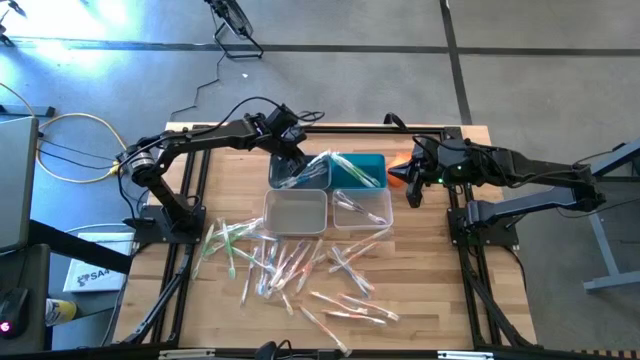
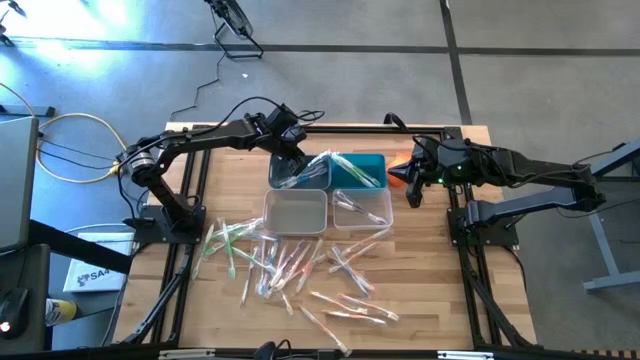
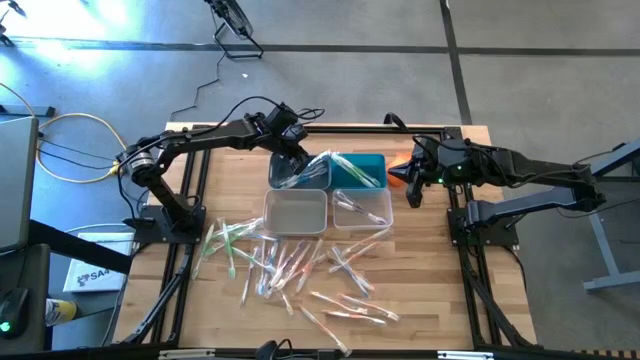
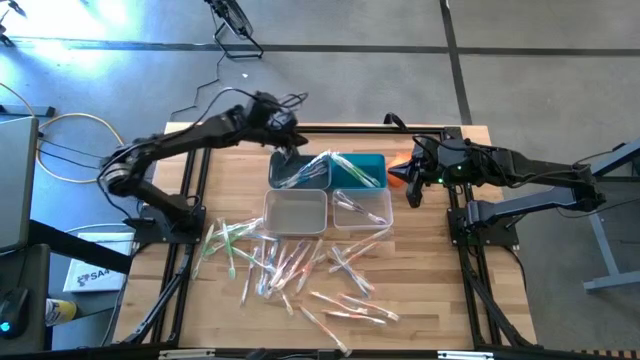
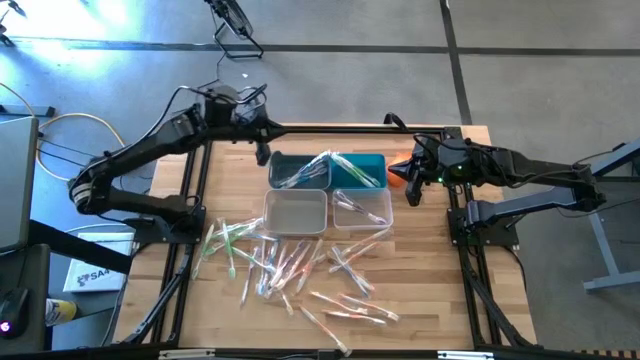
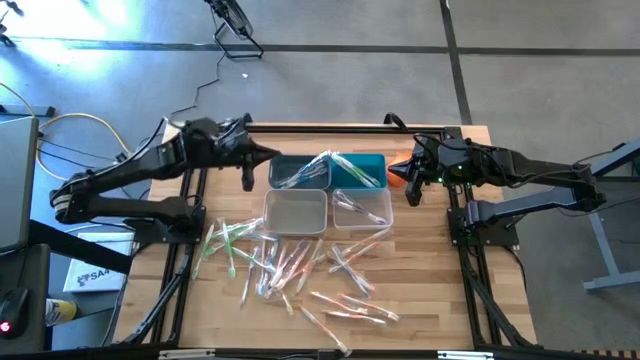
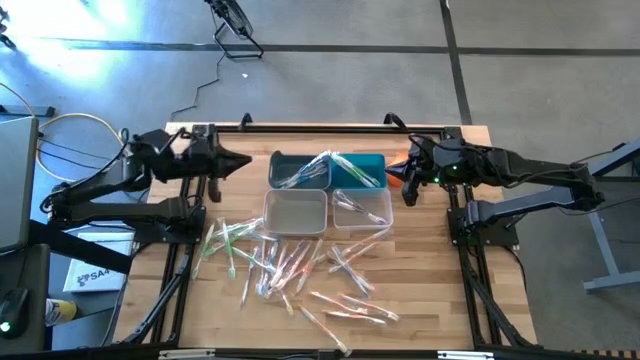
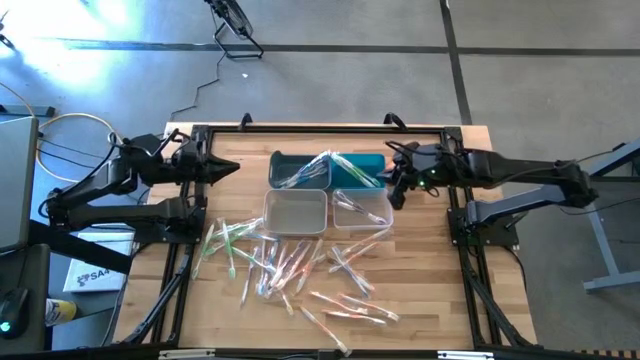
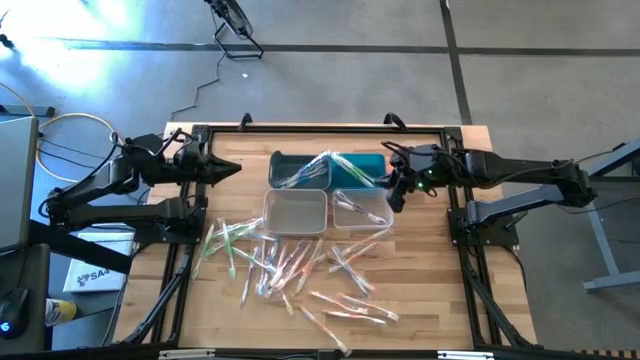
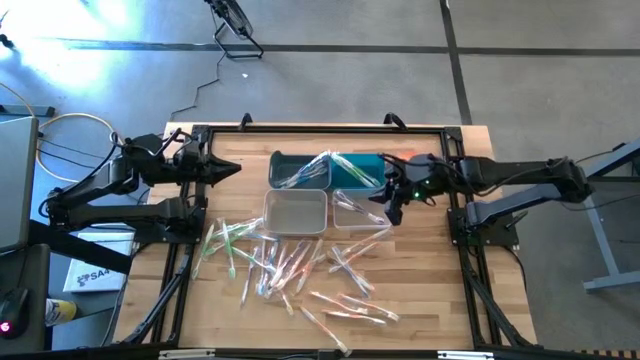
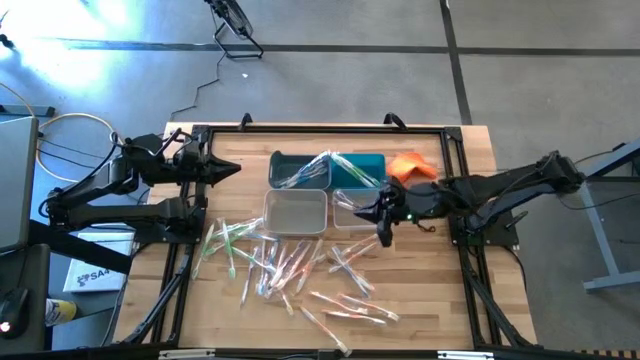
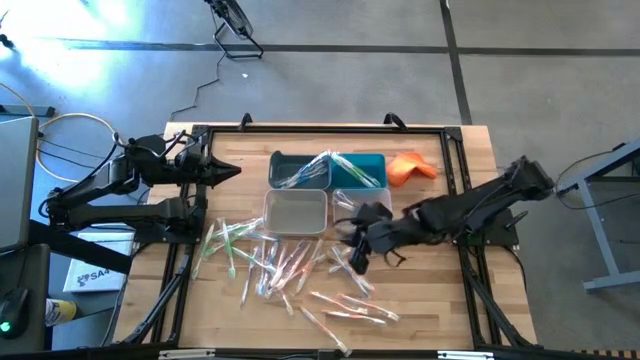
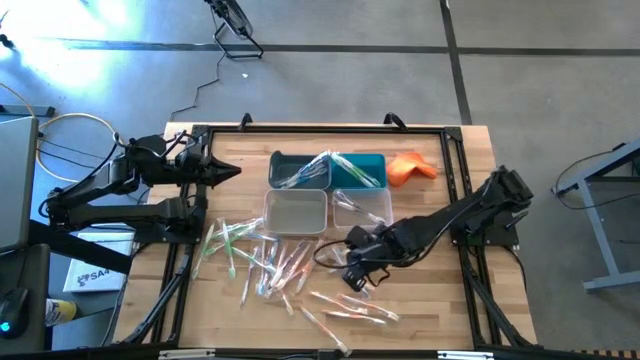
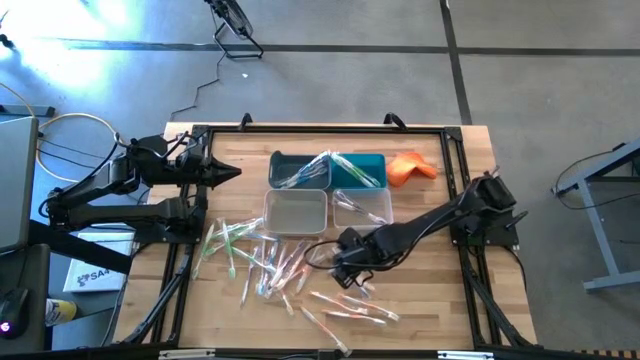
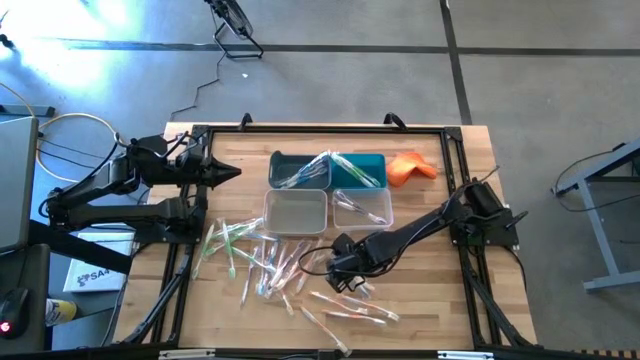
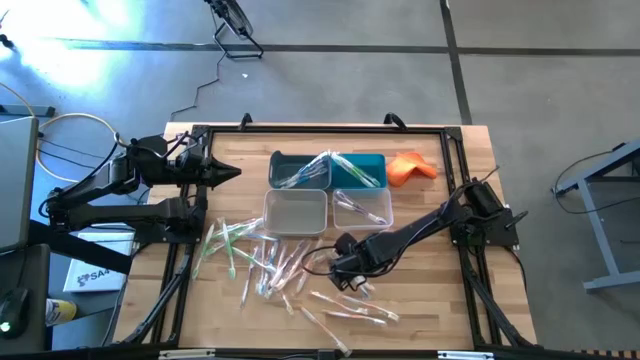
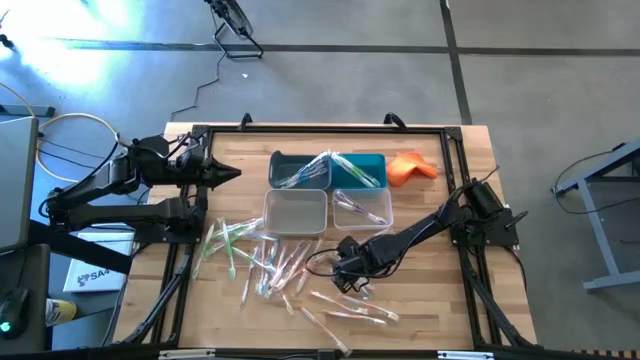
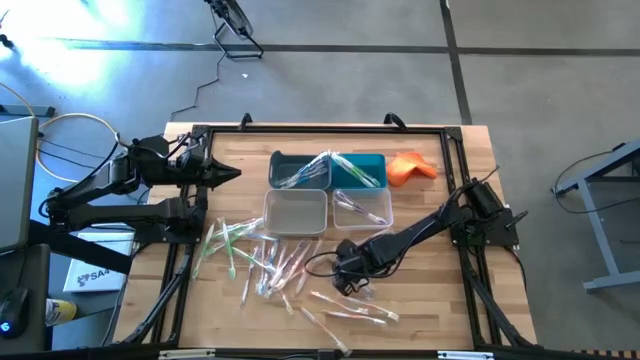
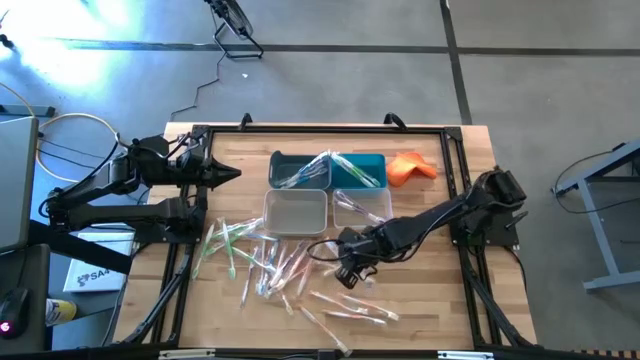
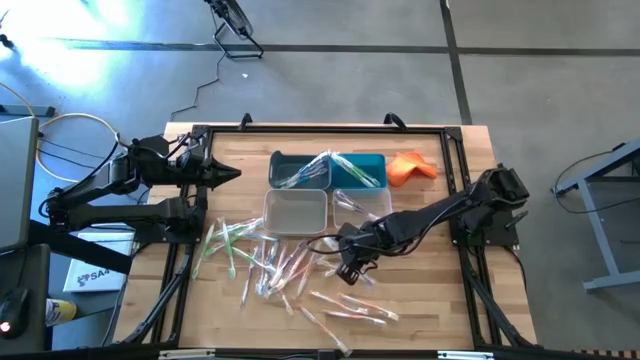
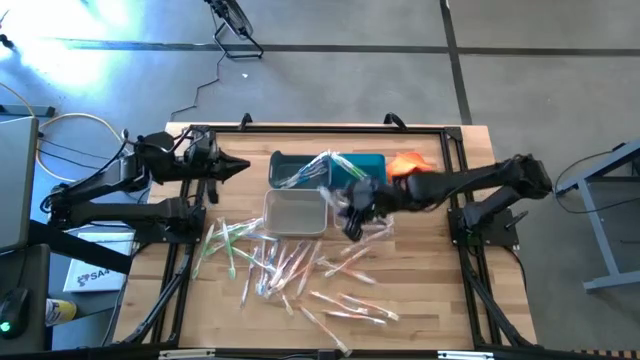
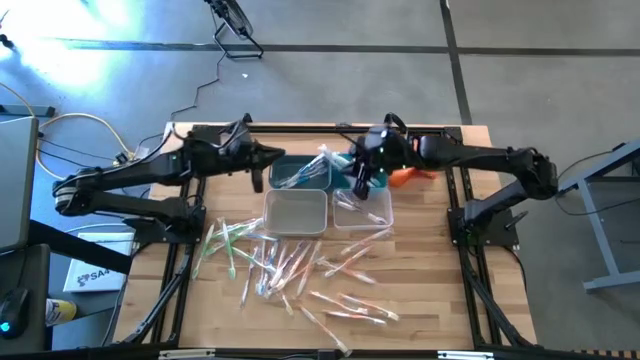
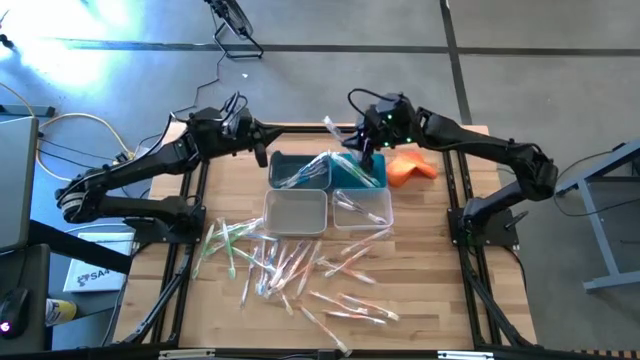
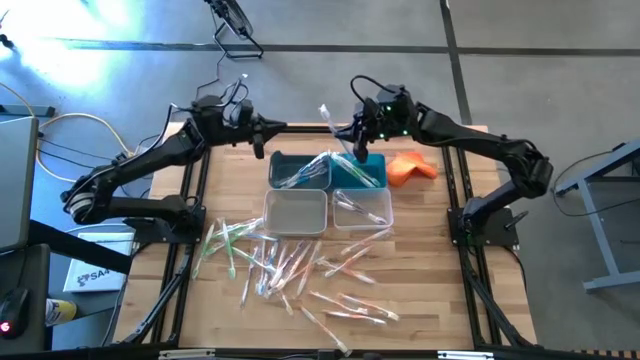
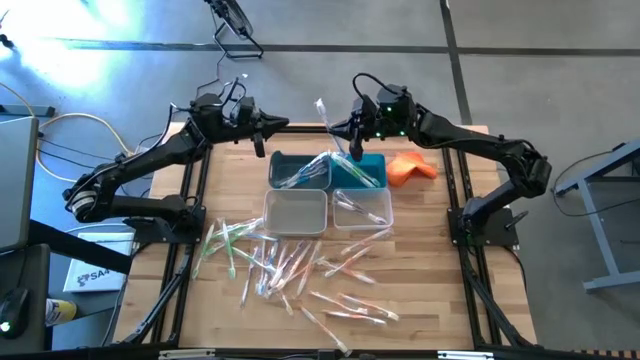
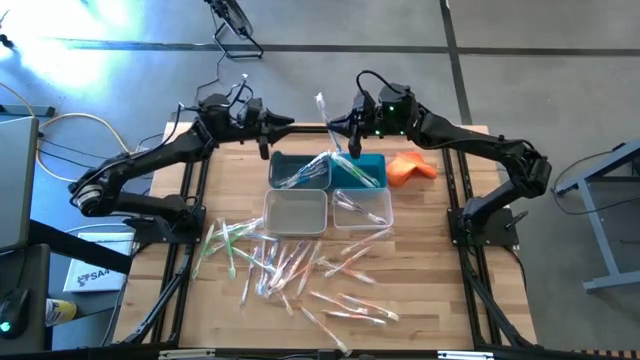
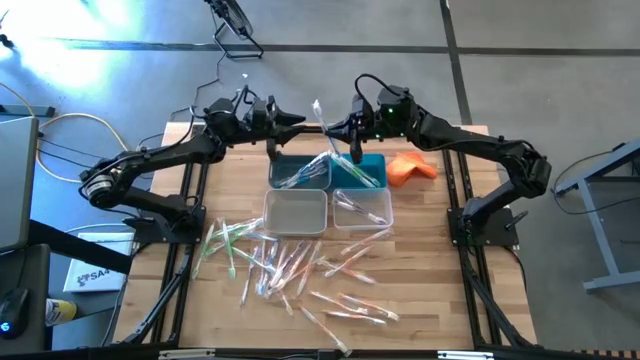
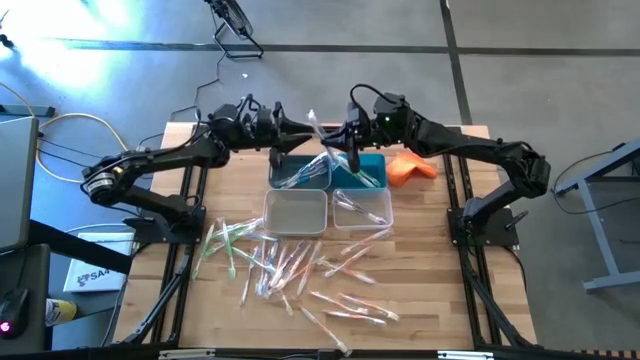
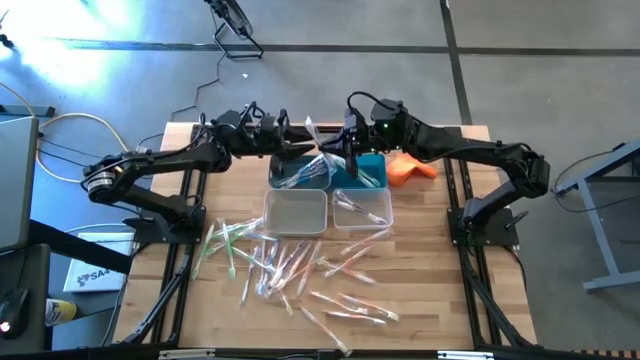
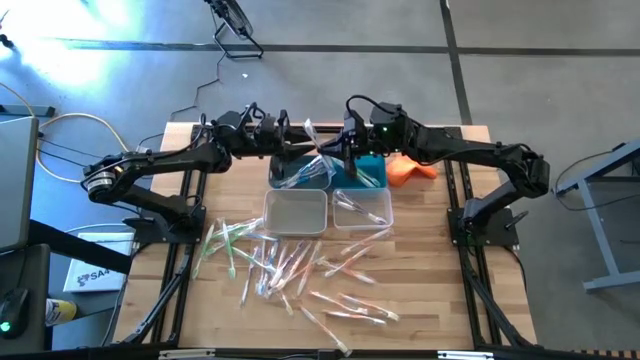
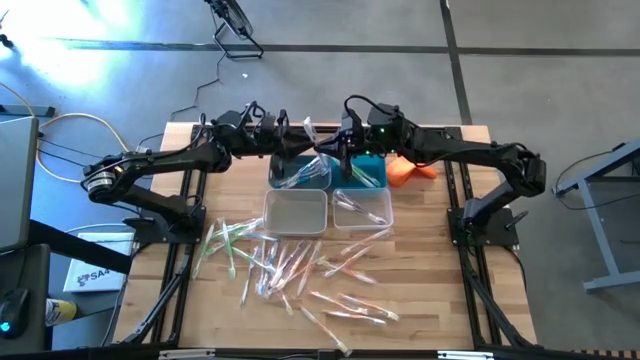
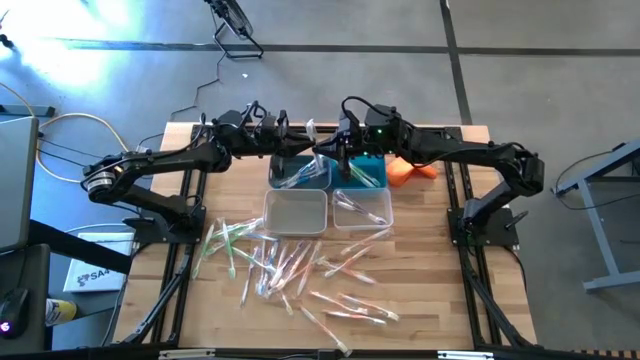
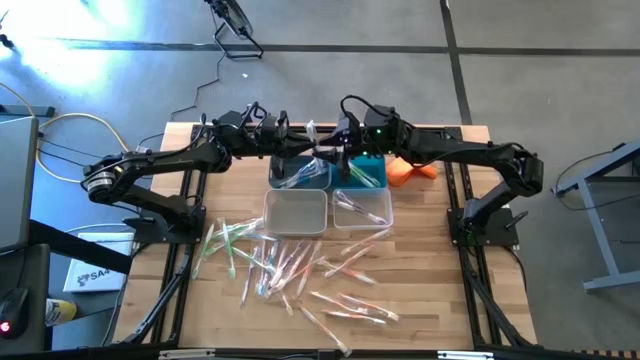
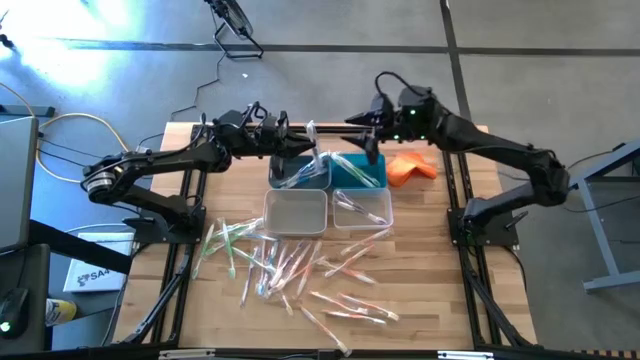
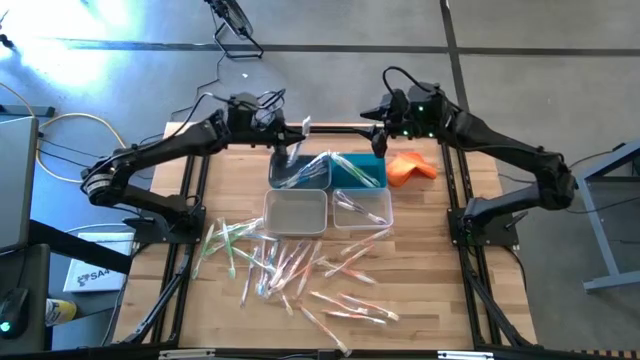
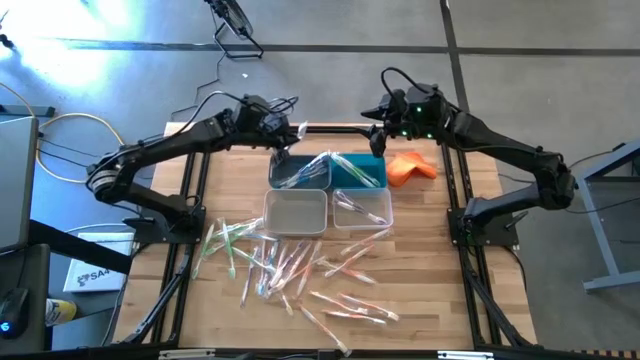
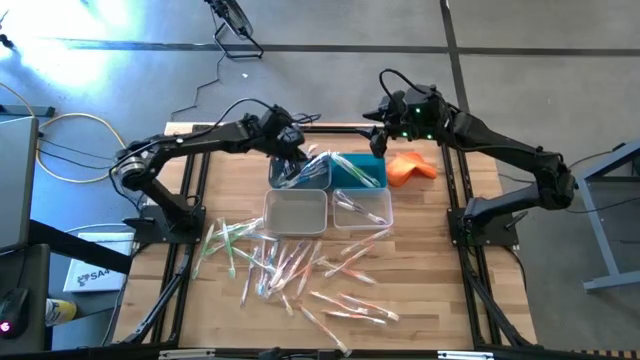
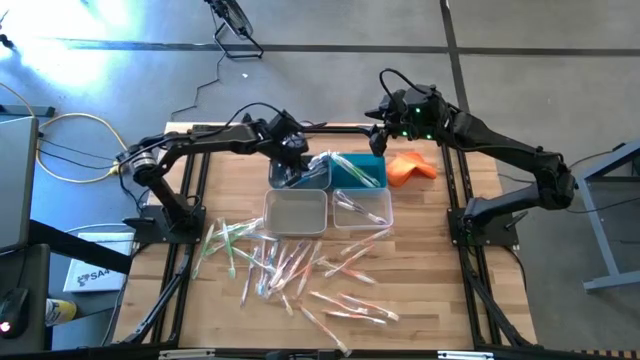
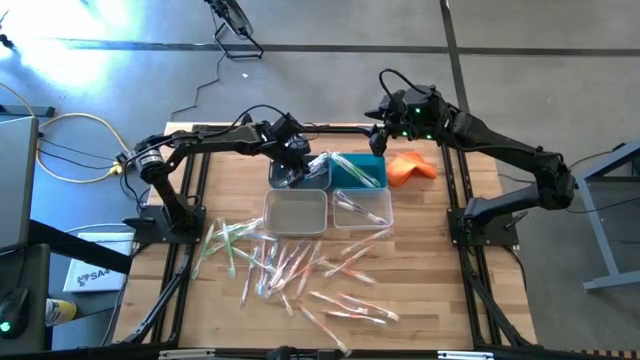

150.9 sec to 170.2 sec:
Task: Pick & Place Toothbrushes
Put the blue toothbrush into the dark blue bin

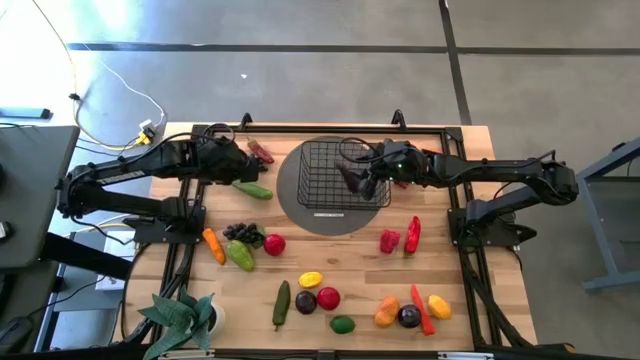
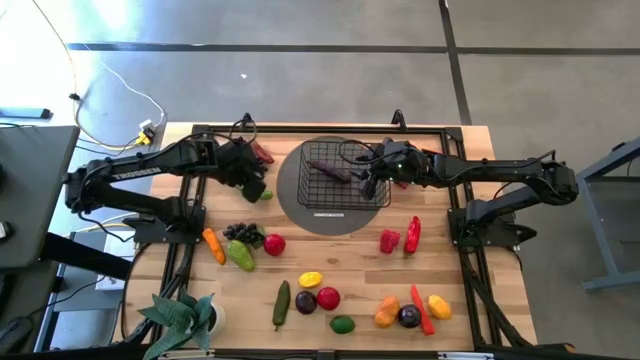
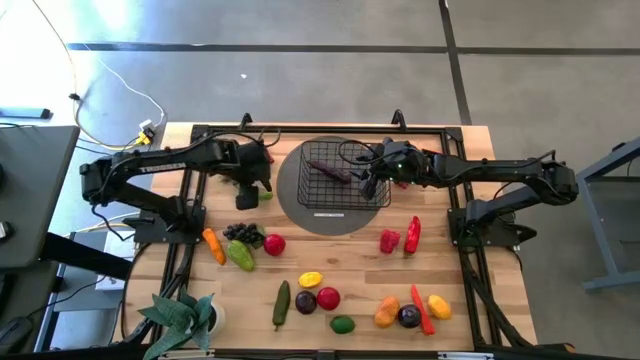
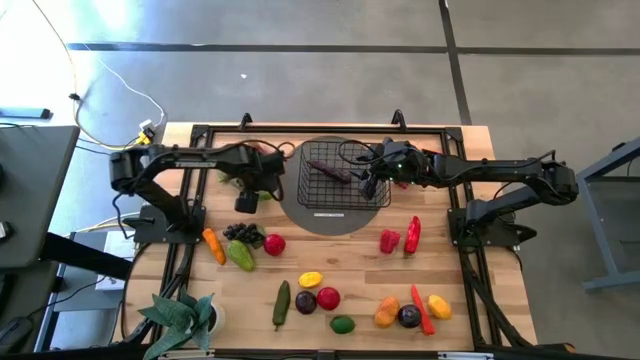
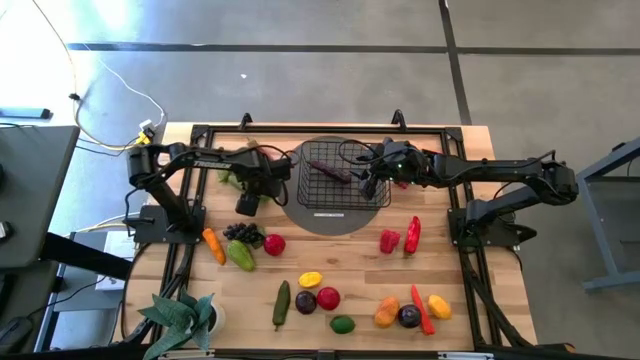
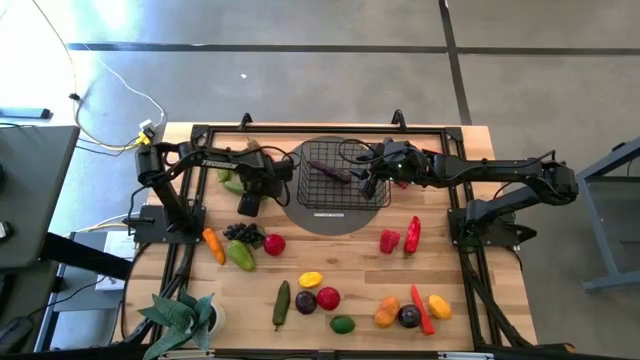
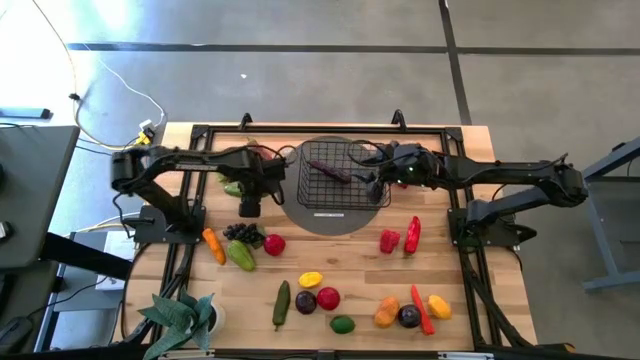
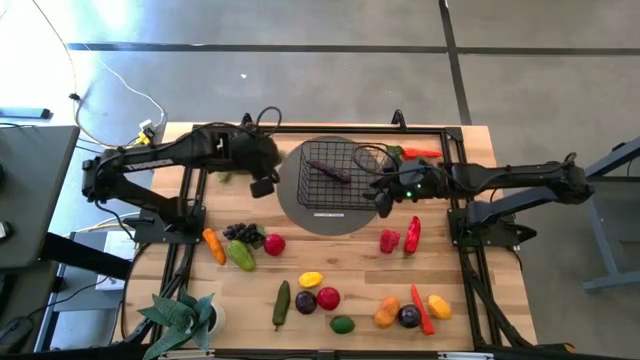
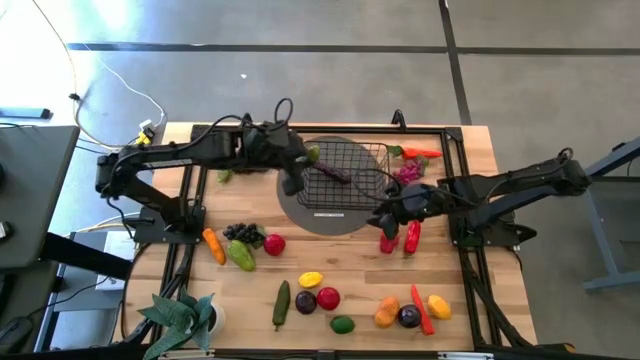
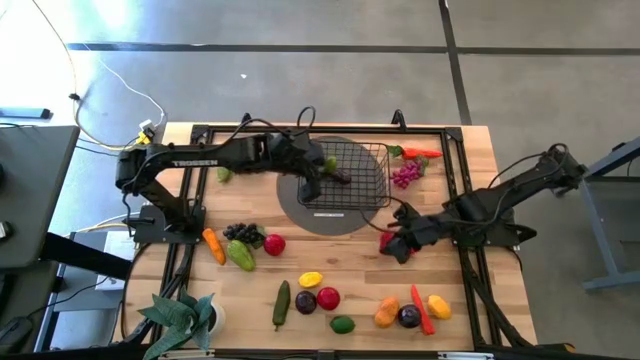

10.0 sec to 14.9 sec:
Task: Build produce basket
Put the bottom green cucumber into the black mesh basket
